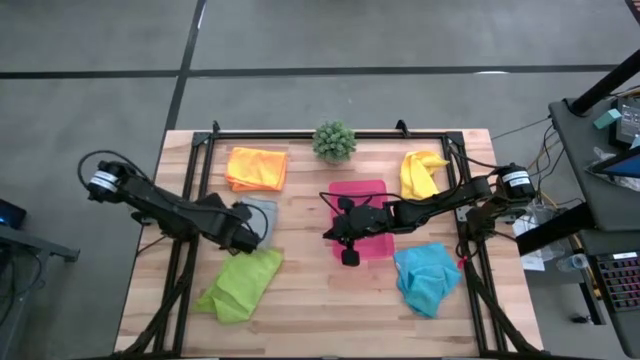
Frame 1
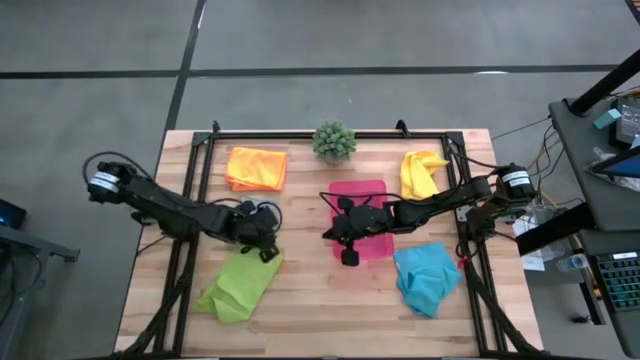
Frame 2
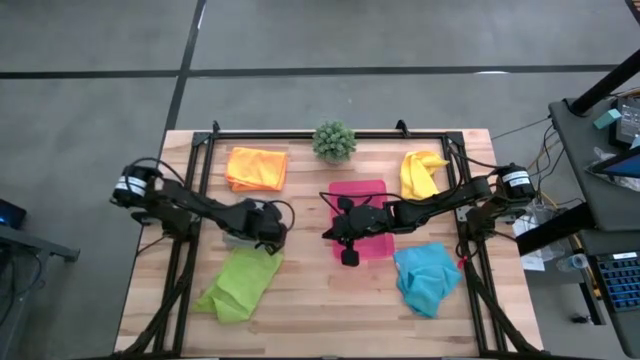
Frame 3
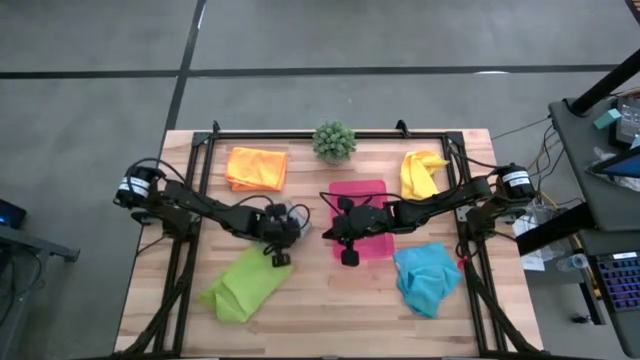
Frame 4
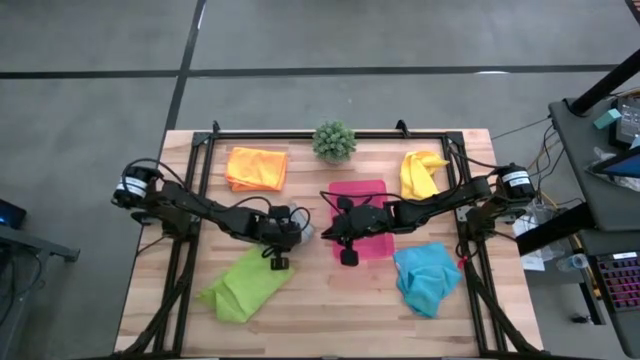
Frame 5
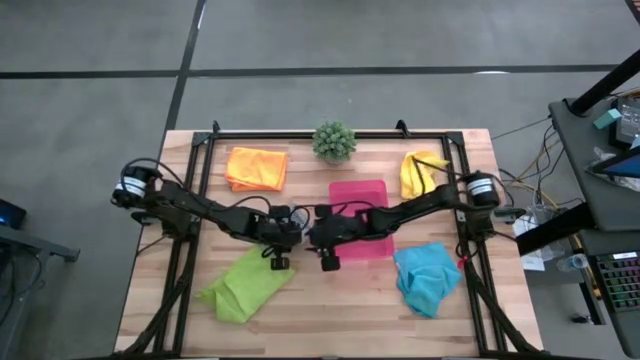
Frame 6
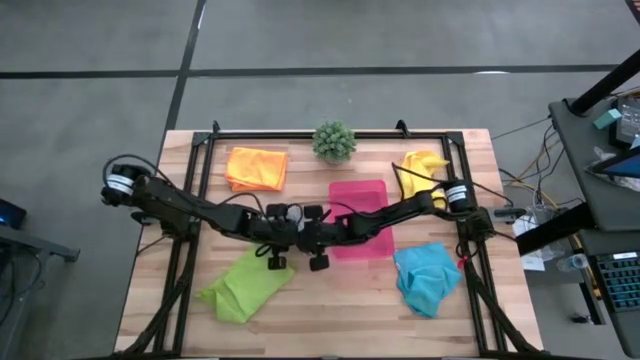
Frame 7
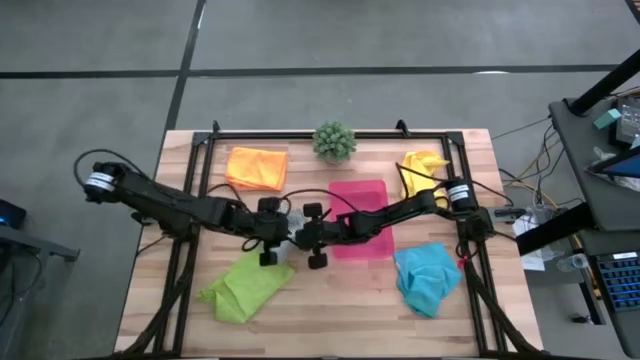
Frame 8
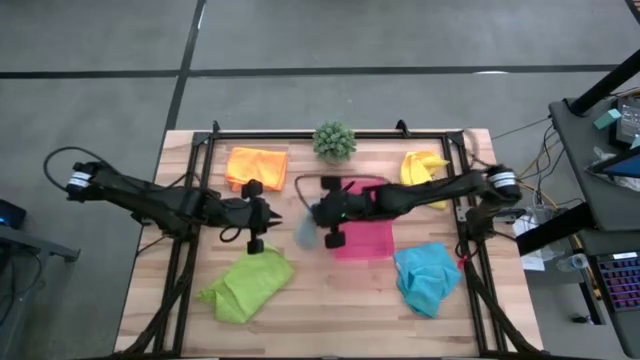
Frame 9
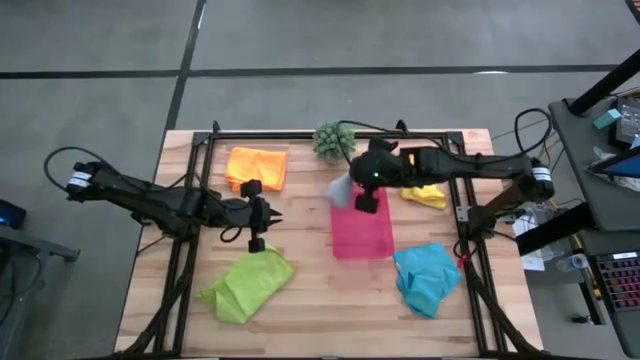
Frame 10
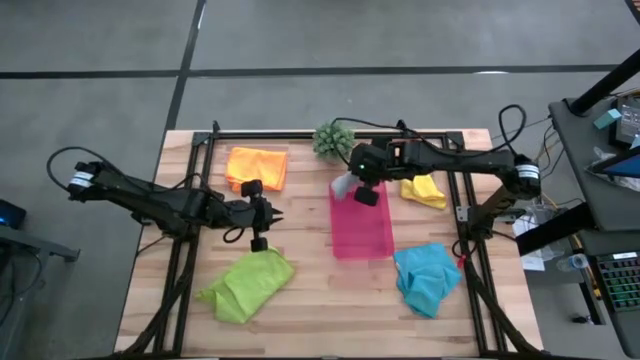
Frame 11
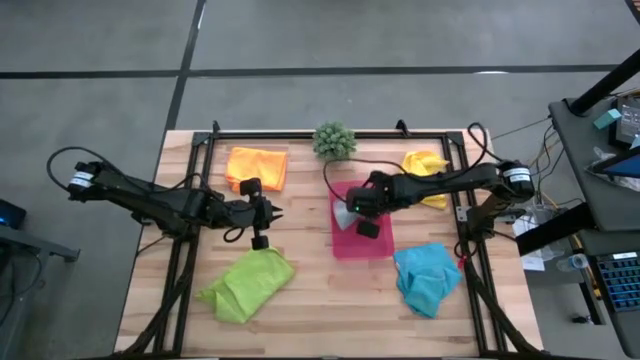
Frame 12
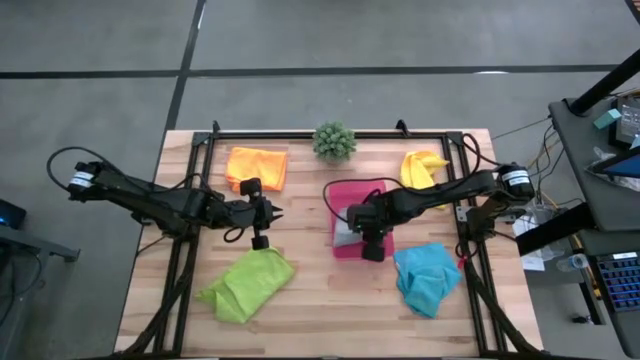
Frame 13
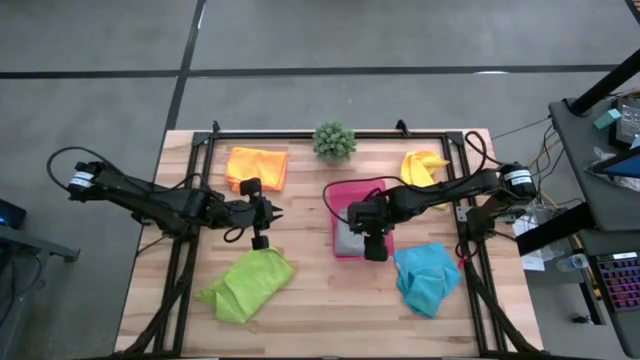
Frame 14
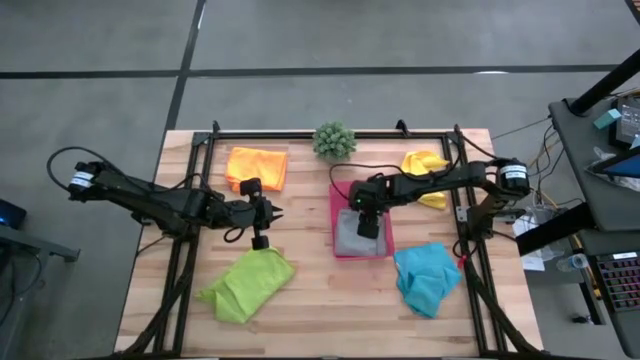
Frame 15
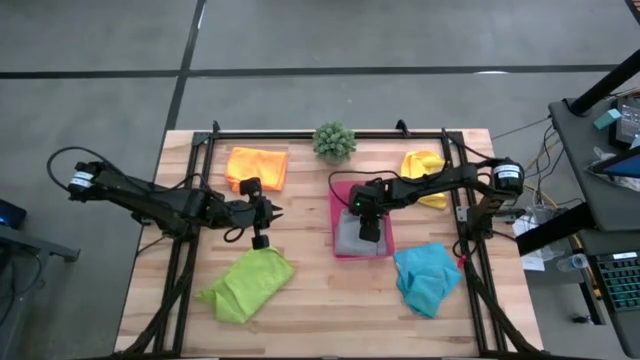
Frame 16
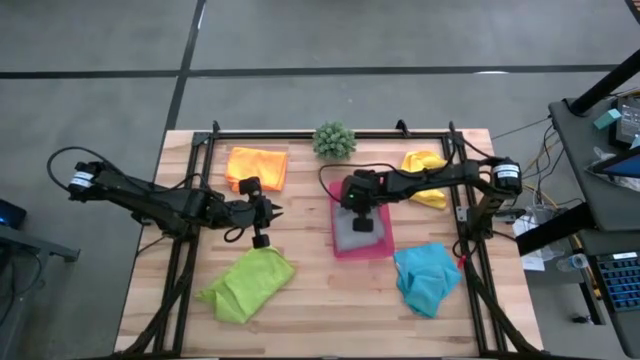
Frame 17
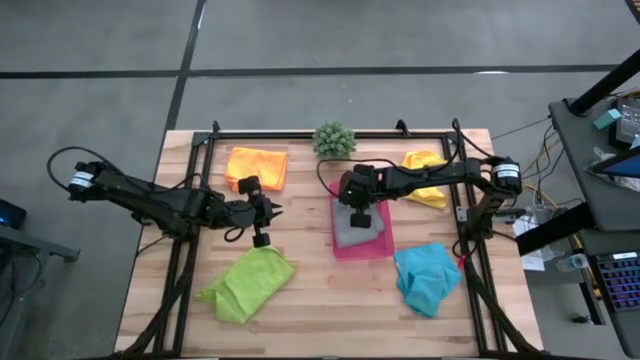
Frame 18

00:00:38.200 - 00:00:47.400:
Task: Fold microfiber towels
Put the gray towel into the red bin

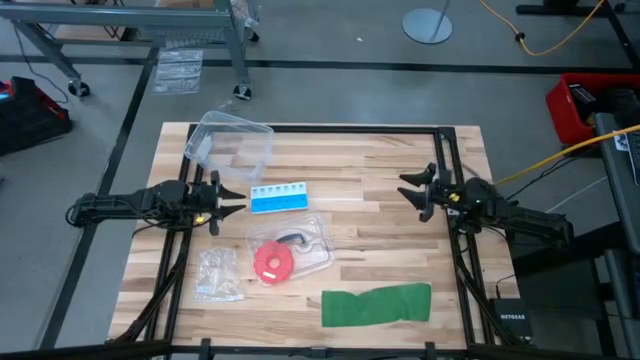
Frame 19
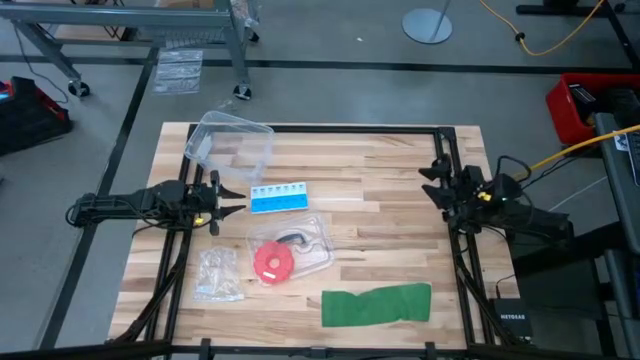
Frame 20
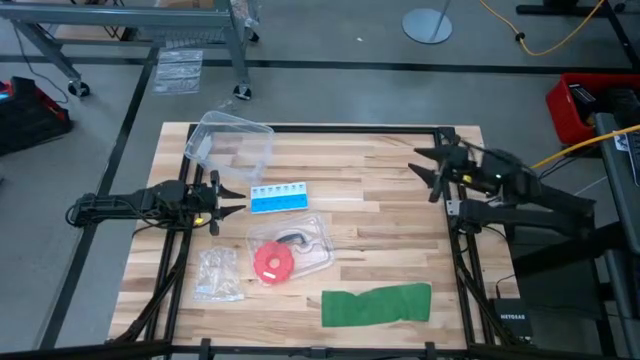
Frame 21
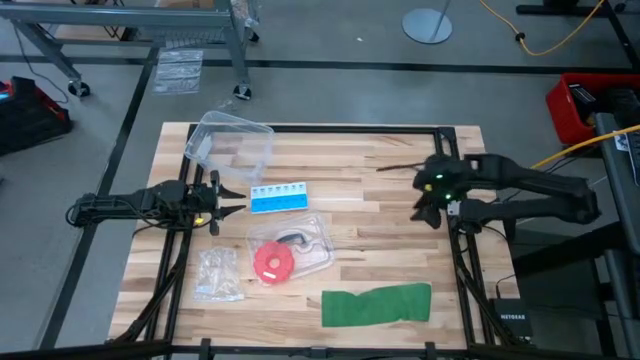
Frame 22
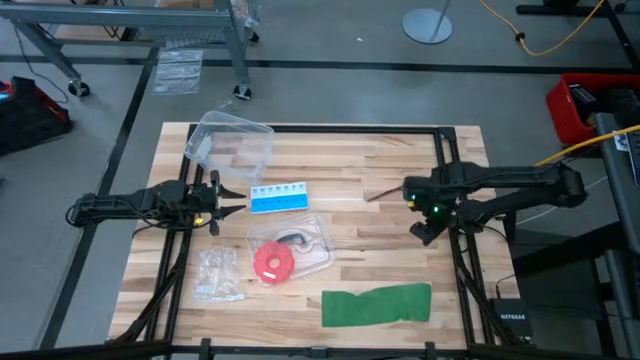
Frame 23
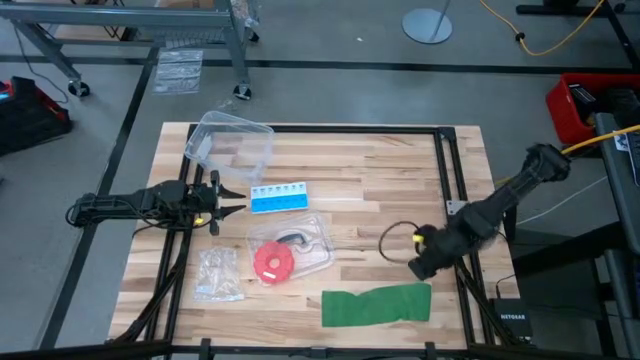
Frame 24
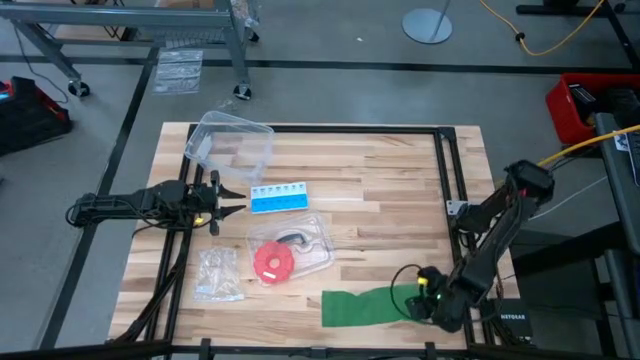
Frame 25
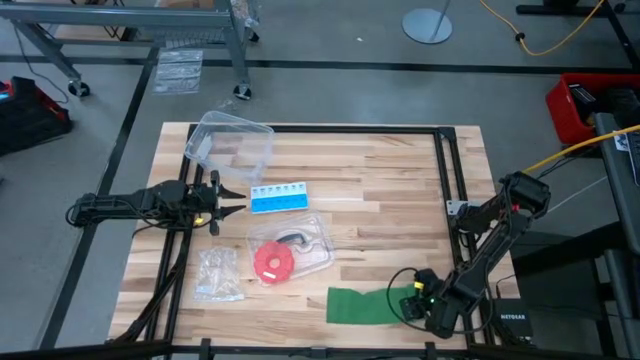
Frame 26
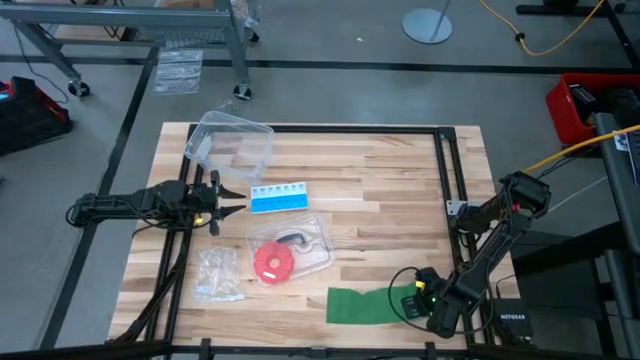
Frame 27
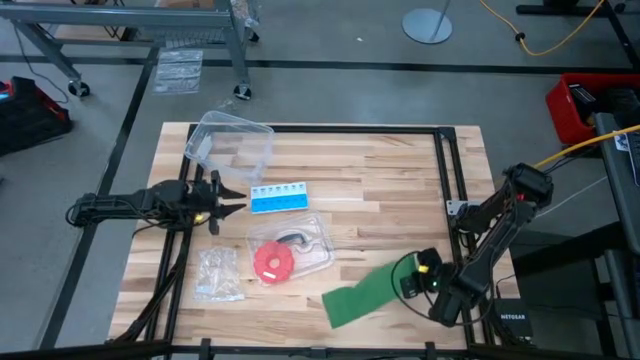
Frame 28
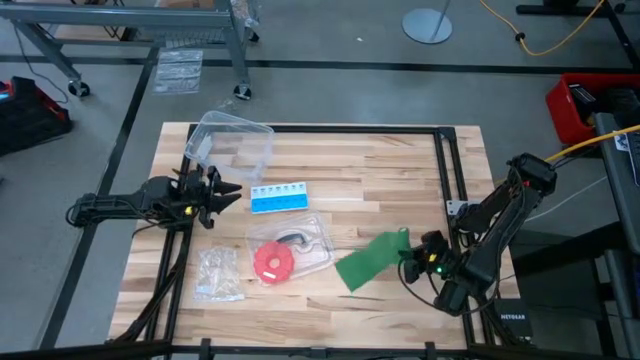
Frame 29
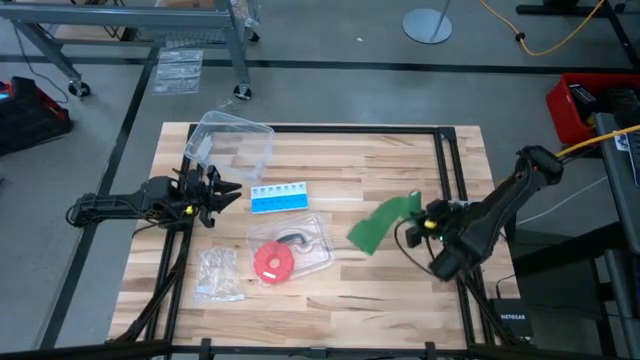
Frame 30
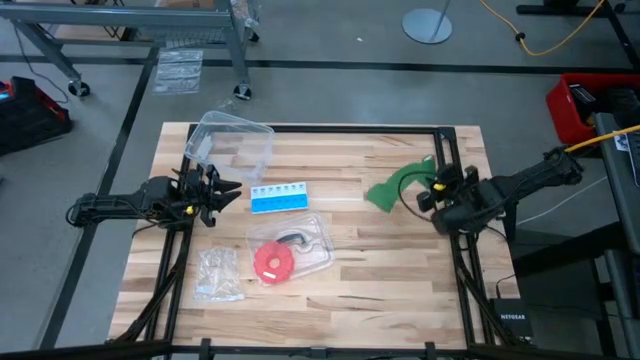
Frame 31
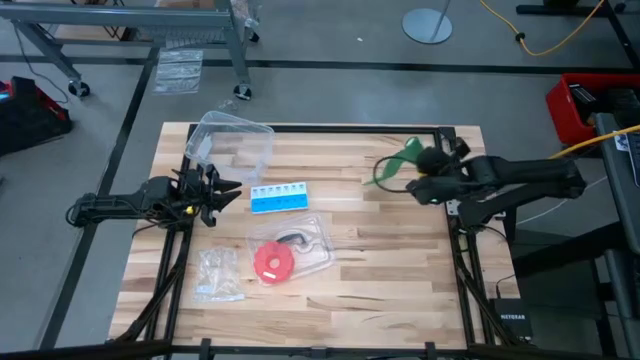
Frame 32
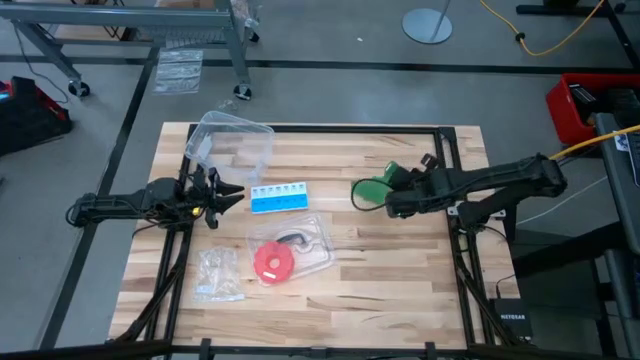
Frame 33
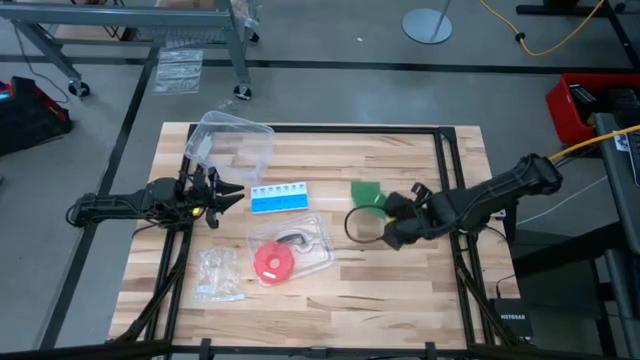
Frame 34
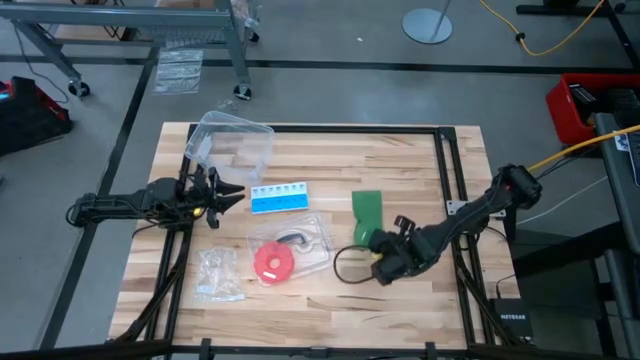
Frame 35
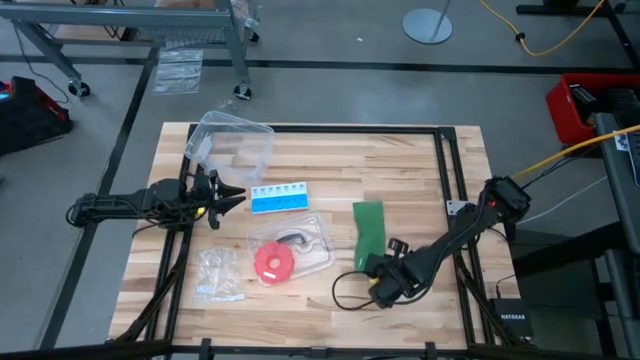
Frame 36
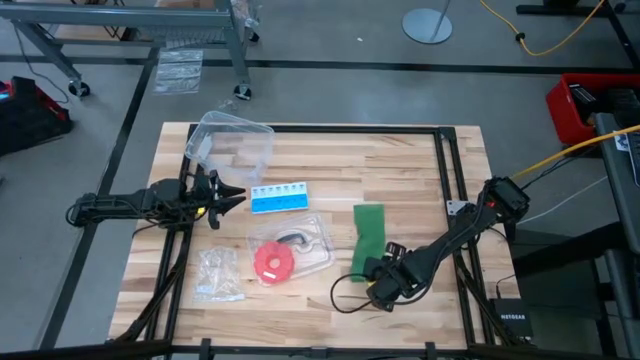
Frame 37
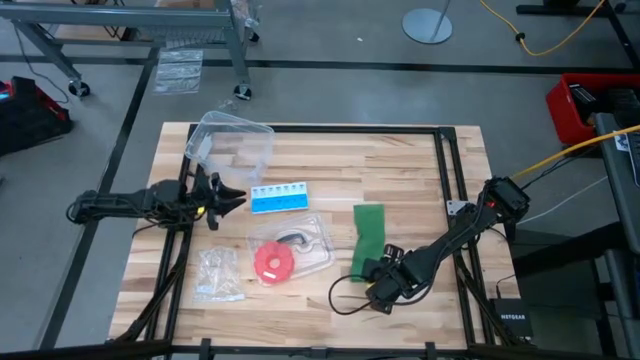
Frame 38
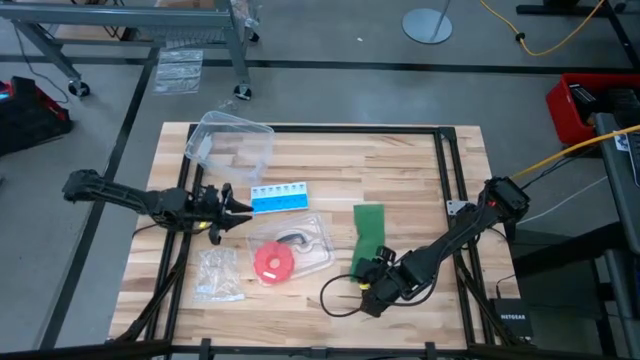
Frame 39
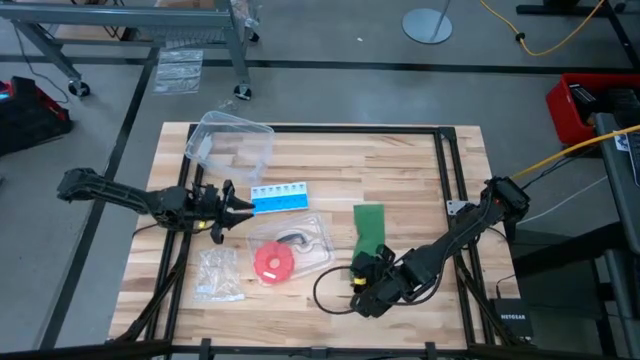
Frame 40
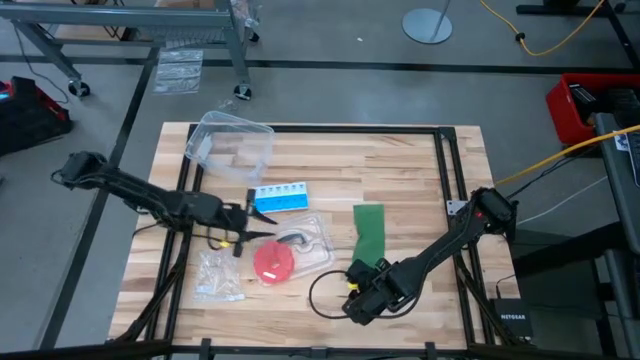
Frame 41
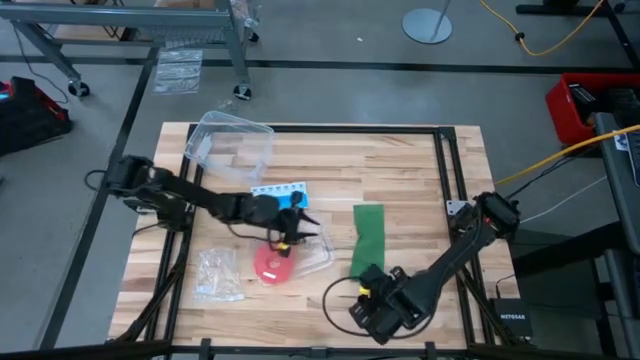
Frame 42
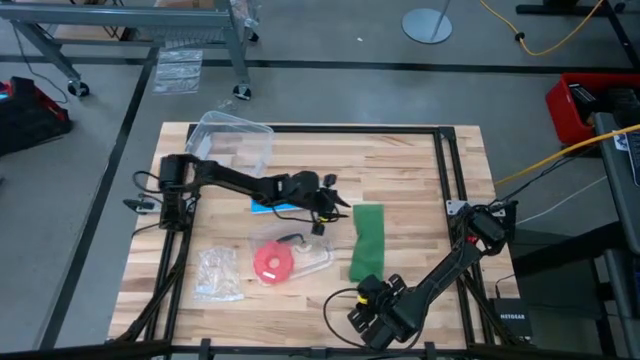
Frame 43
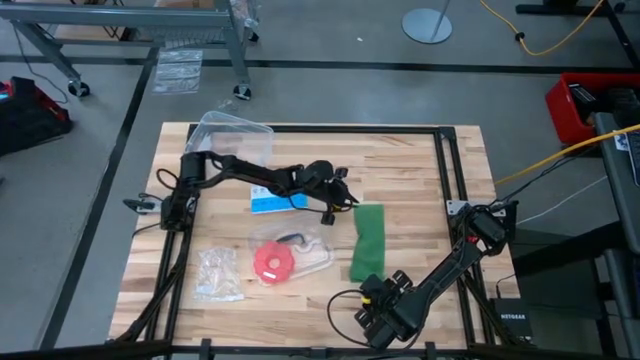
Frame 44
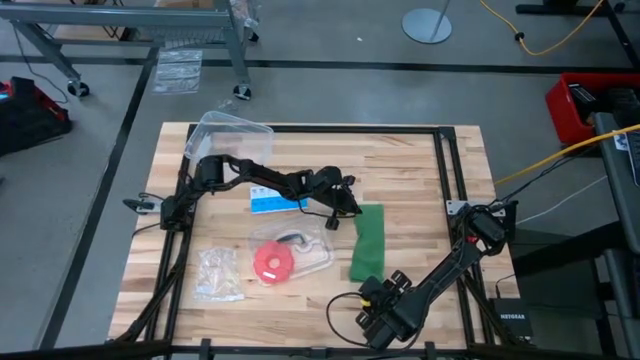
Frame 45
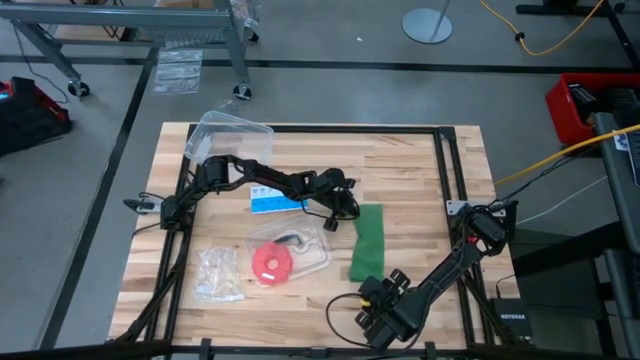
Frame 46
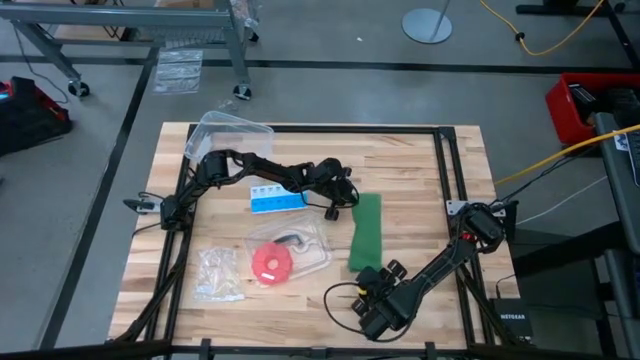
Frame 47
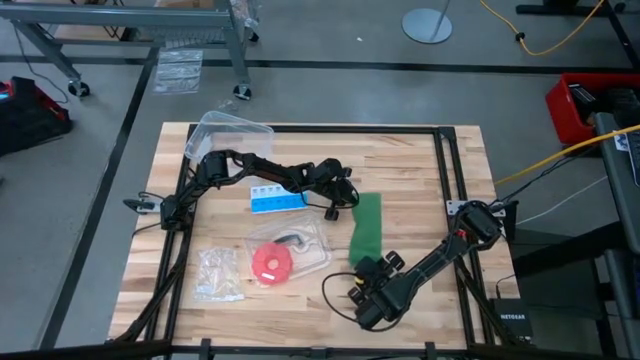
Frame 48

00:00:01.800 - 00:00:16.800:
Task: Roll bandage
Roll the green bandage
